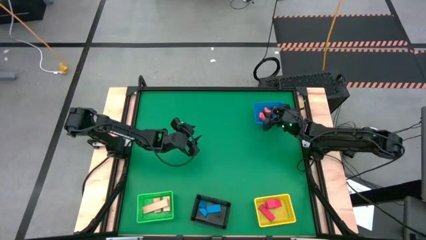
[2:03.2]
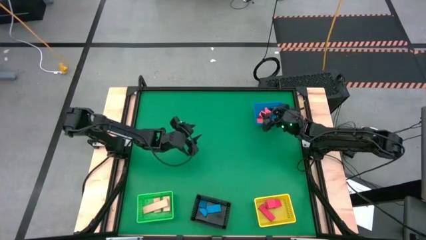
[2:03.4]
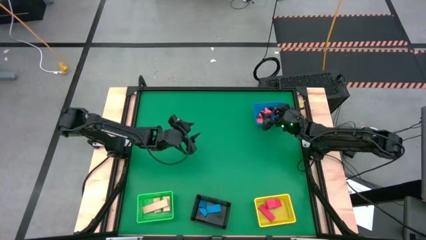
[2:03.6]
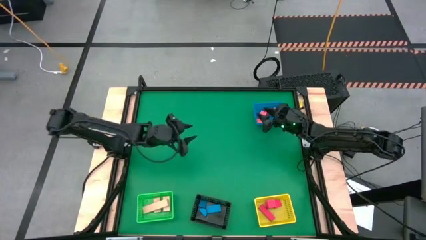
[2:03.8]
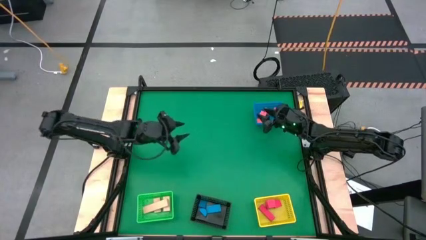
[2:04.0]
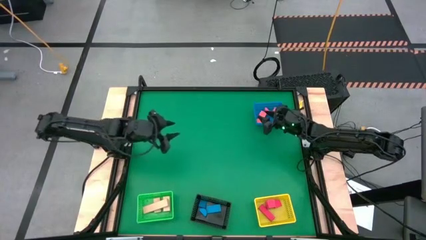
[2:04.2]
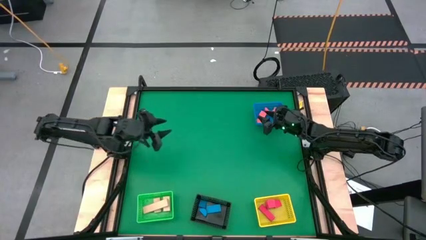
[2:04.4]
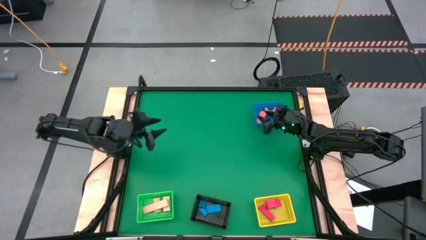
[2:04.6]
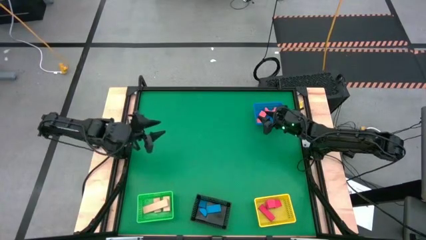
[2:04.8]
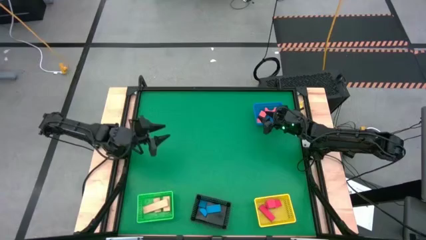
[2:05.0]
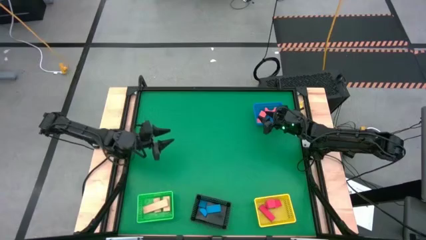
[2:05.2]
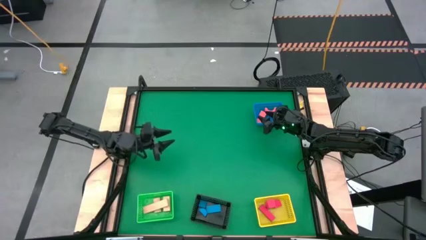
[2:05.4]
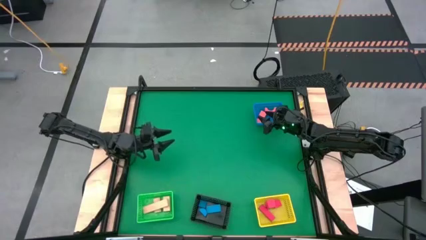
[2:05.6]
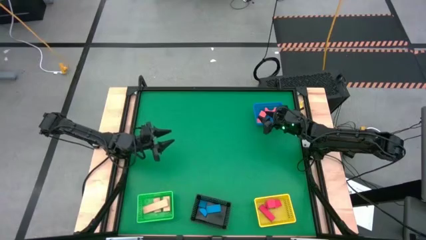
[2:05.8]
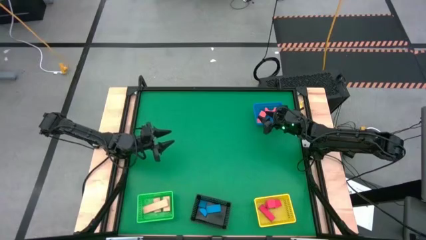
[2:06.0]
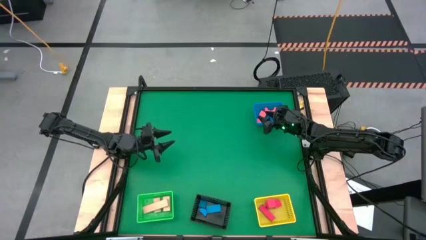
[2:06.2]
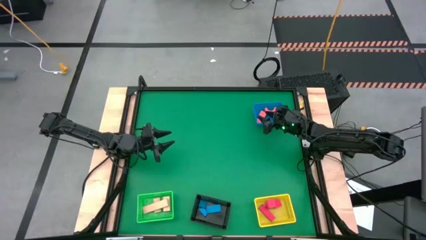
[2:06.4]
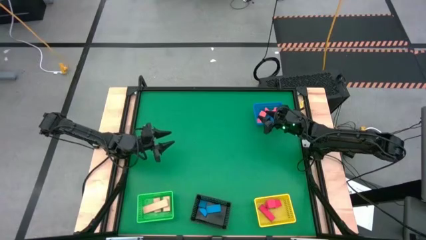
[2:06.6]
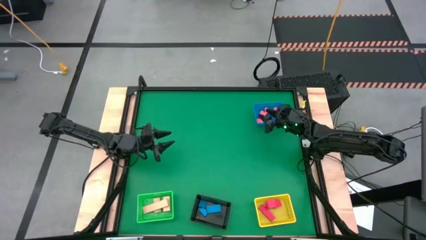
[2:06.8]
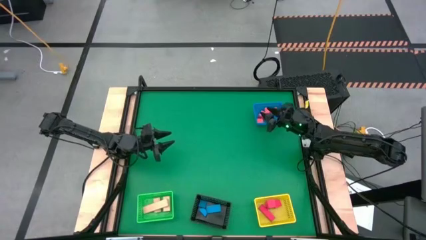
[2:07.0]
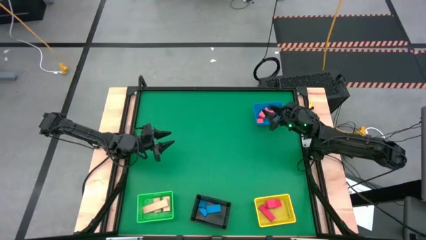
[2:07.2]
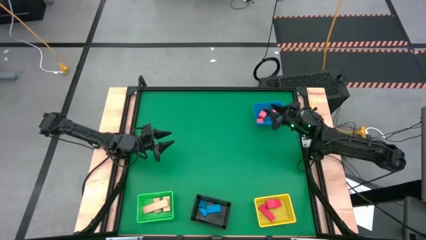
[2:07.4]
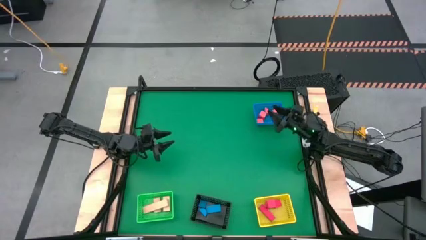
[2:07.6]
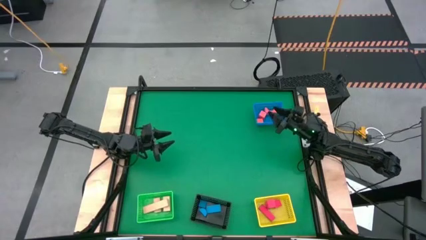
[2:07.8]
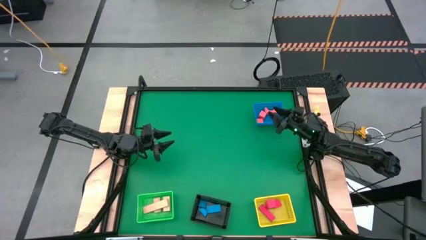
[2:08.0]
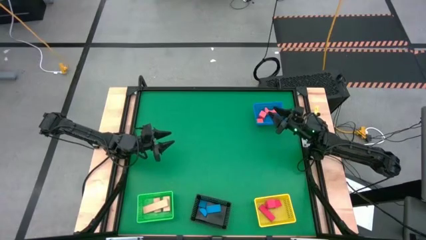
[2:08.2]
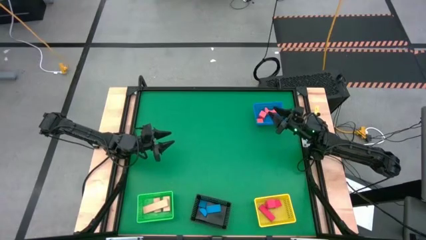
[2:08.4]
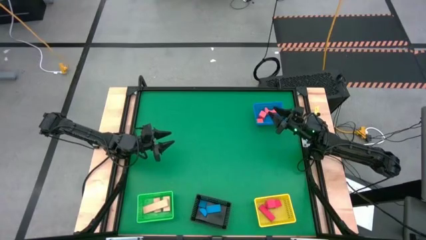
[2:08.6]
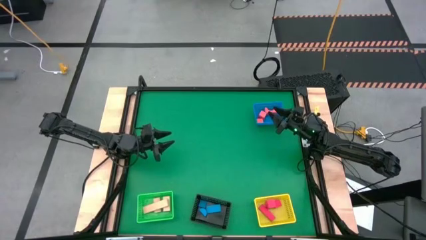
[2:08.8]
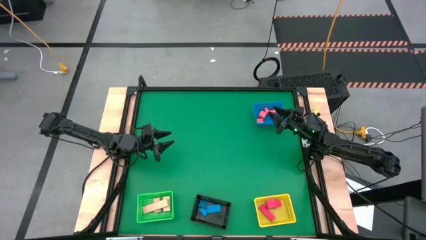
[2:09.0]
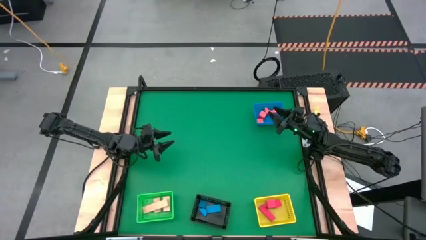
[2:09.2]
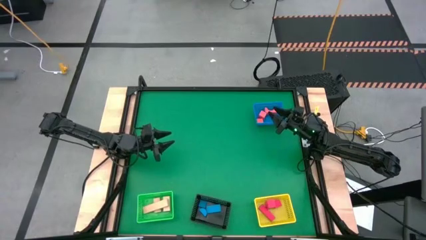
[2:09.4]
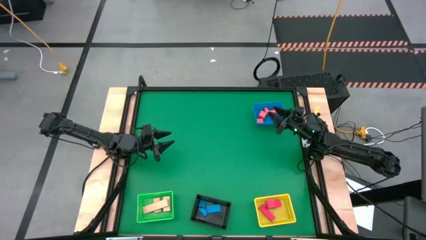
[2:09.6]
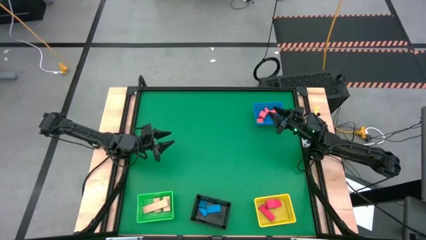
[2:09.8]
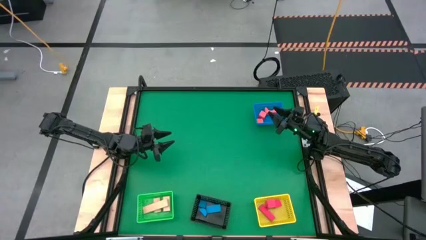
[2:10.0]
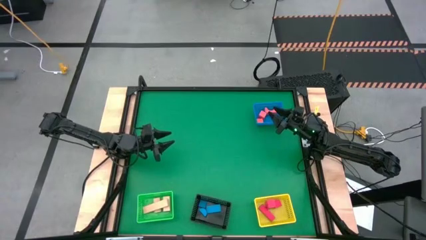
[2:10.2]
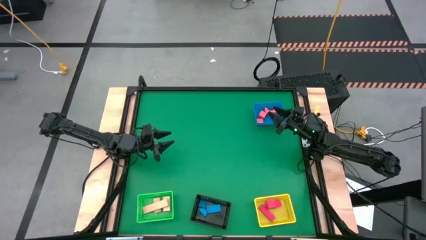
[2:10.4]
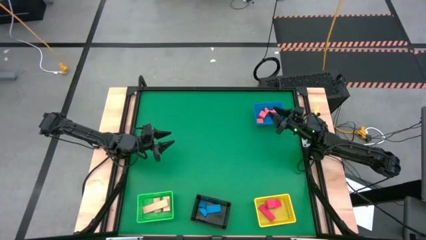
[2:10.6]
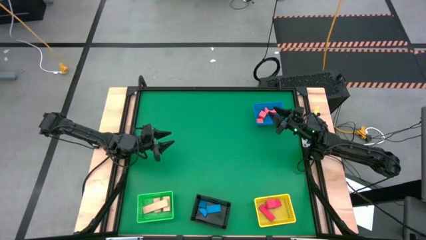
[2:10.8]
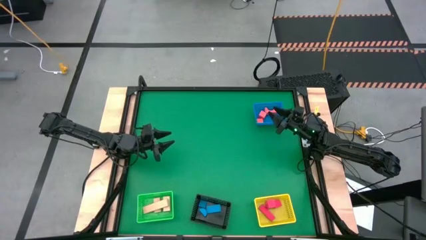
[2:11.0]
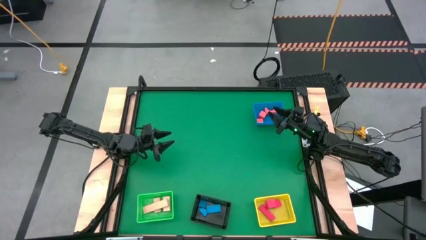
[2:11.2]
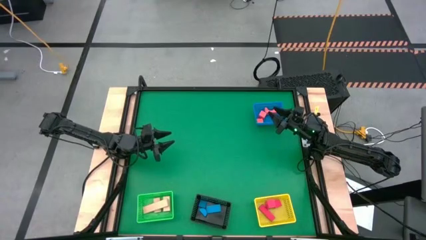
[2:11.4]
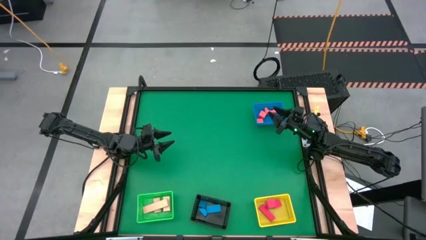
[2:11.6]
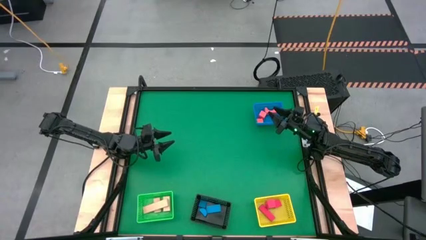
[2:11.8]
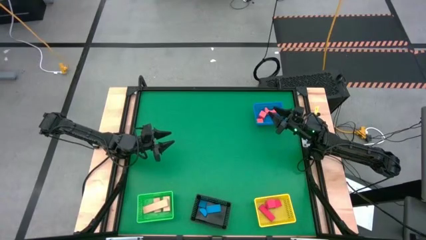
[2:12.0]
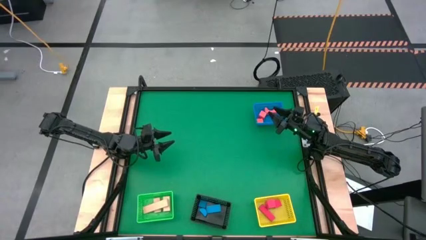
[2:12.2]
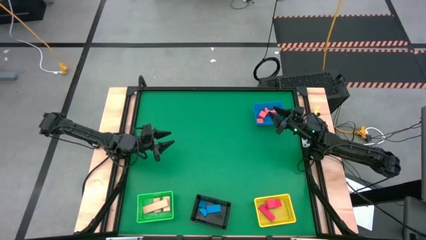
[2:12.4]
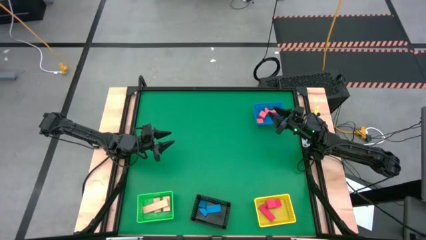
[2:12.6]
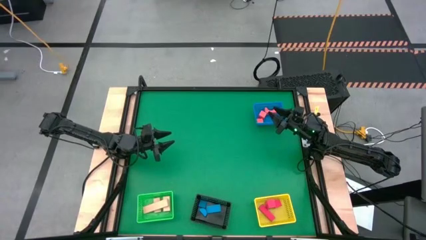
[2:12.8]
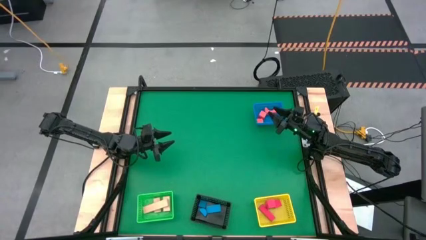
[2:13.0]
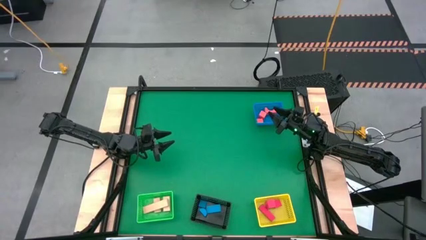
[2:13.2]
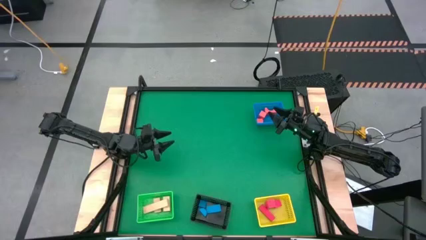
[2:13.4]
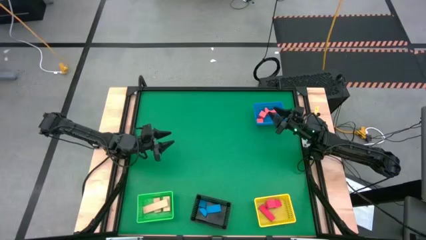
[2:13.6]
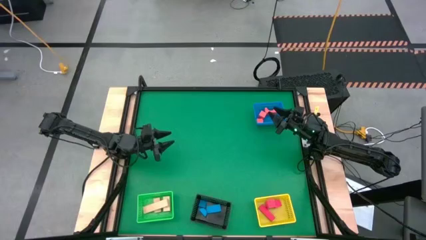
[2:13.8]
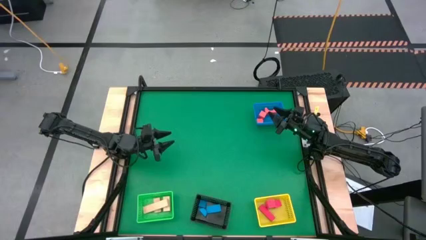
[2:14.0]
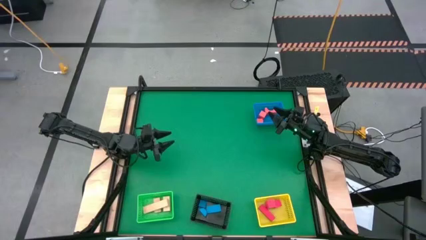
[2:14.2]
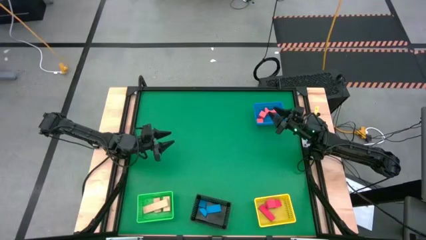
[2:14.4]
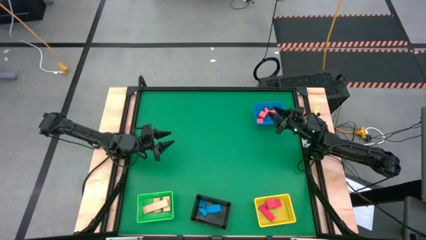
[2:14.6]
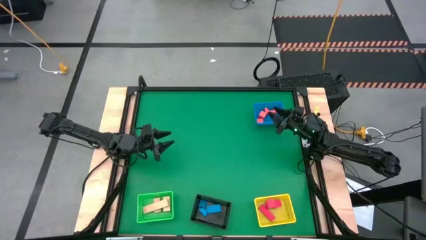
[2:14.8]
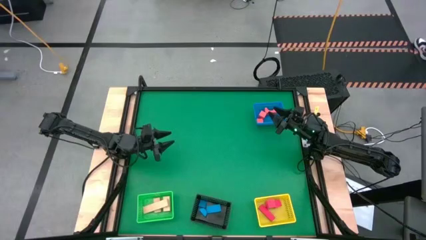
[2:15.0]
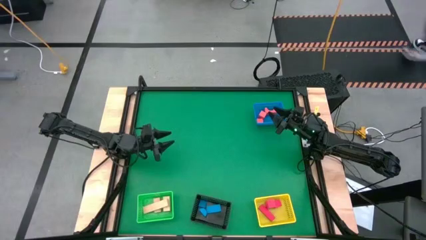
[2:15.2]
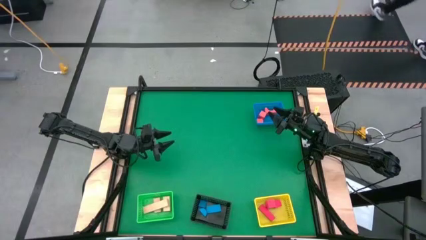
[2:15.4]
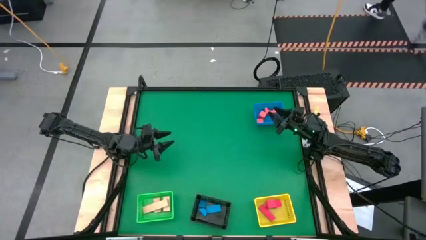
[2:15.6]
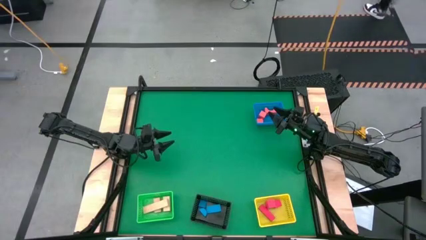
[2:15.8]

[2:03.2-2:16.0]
Task: Sort & place blocks by color
Return to Home Position
